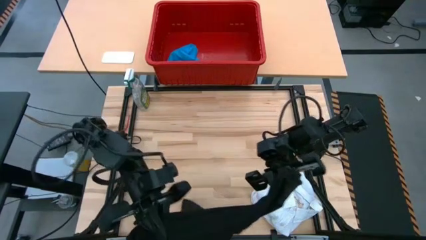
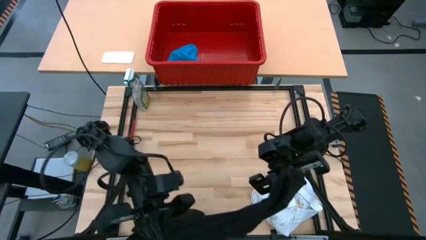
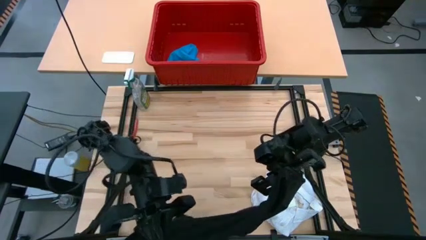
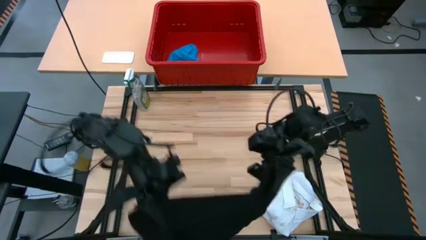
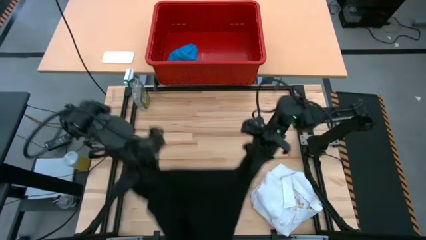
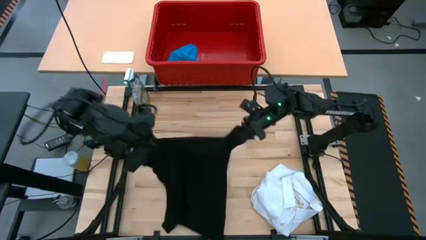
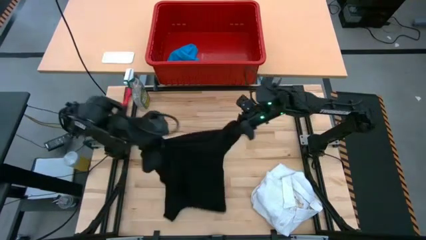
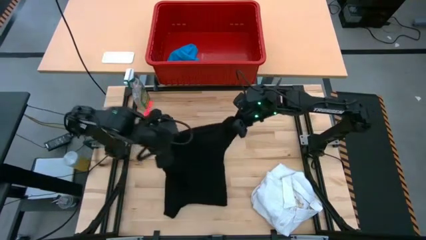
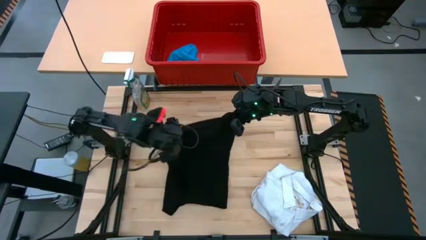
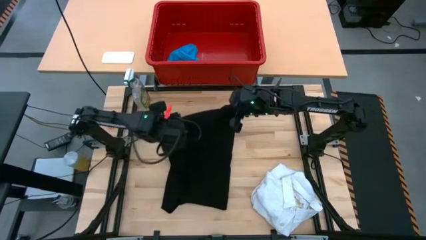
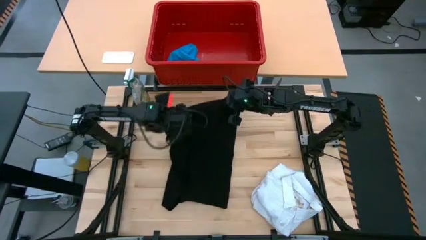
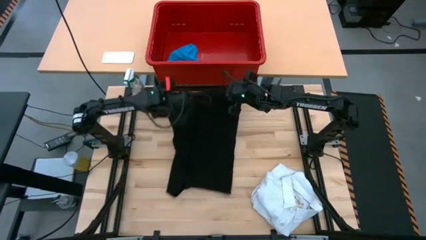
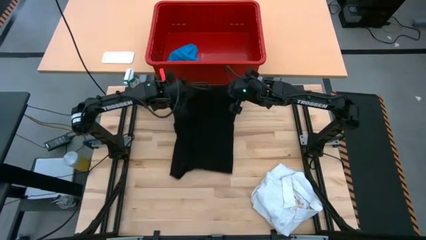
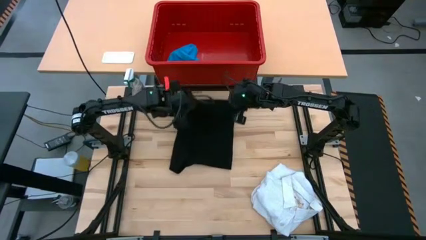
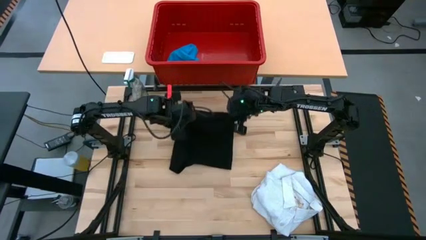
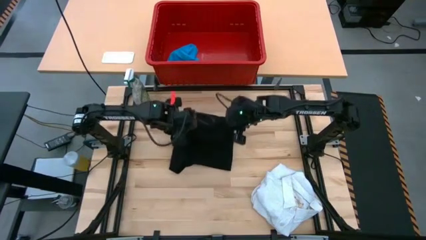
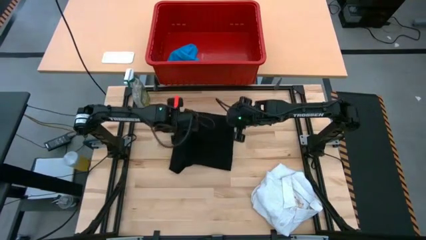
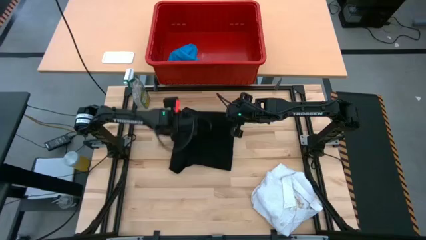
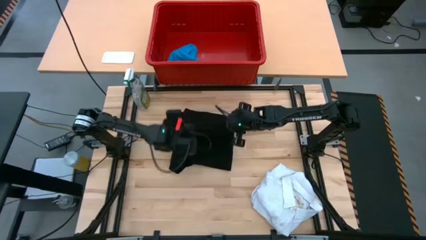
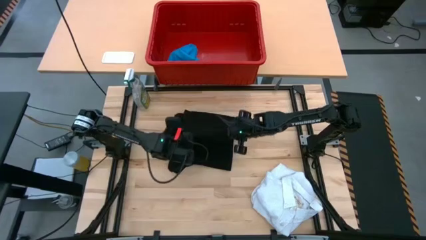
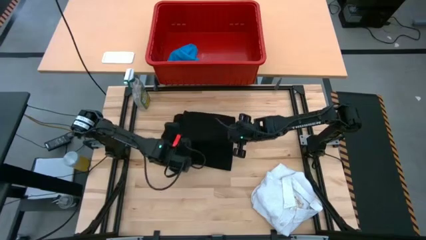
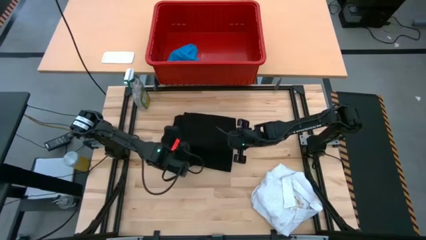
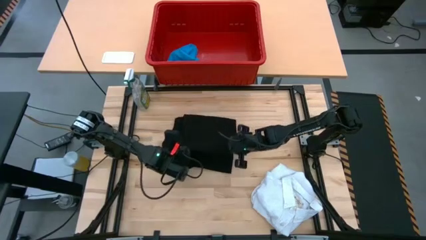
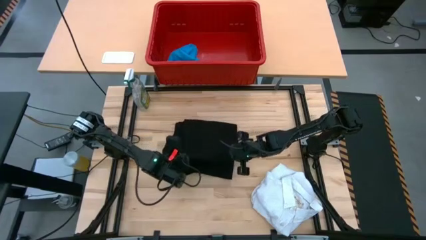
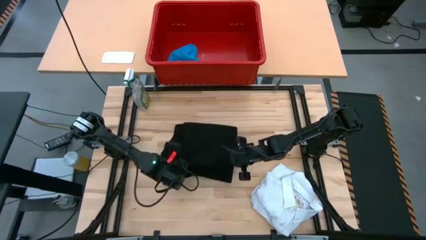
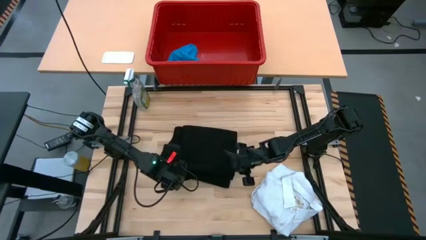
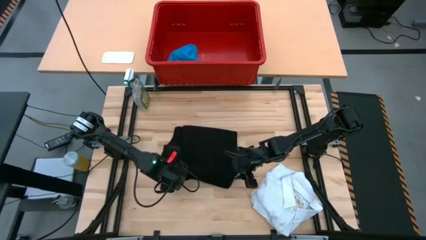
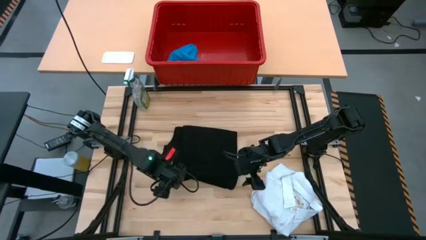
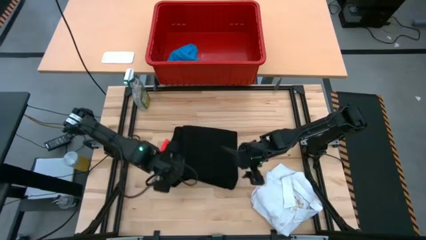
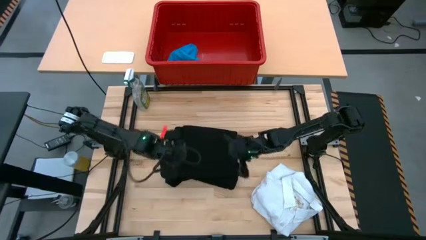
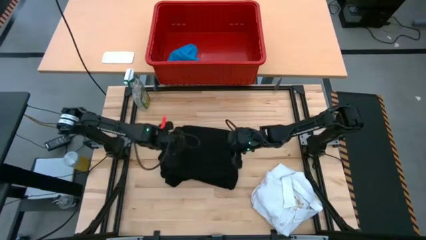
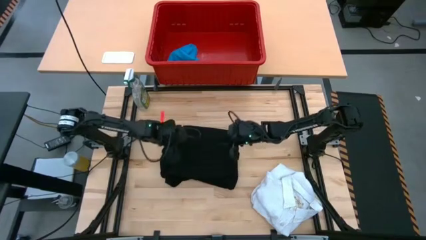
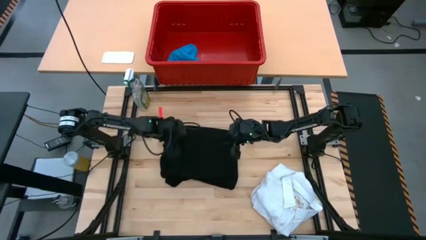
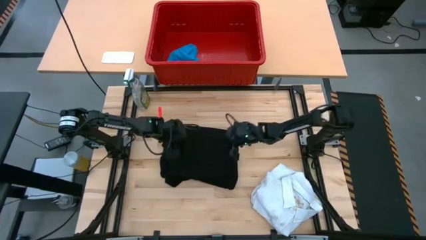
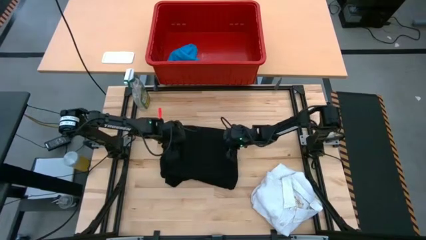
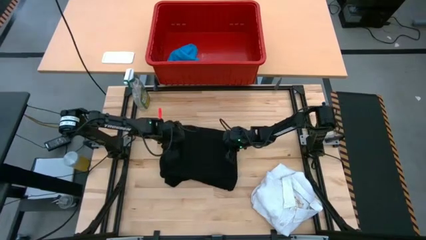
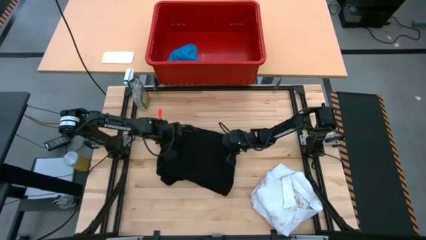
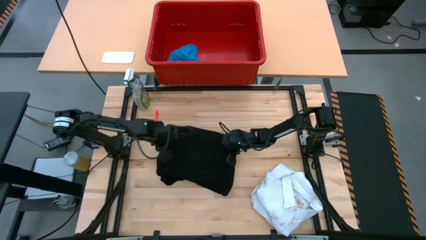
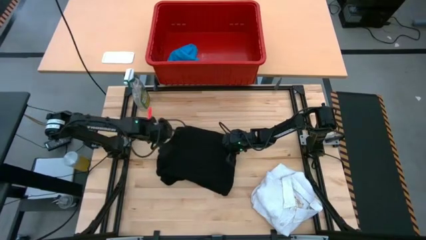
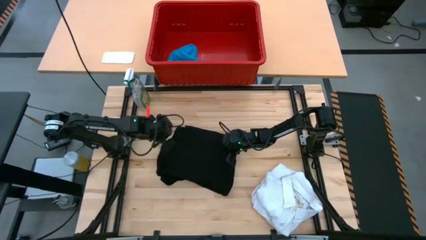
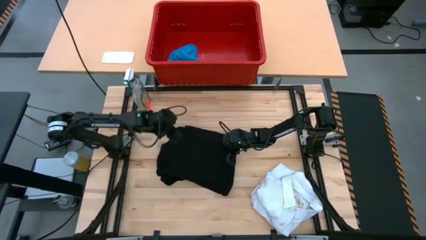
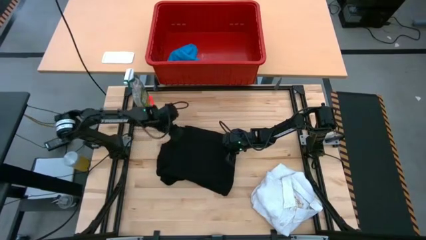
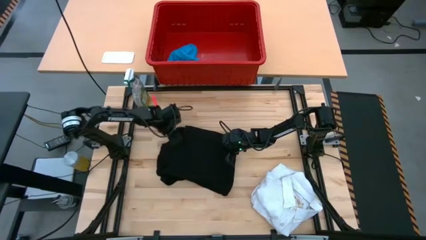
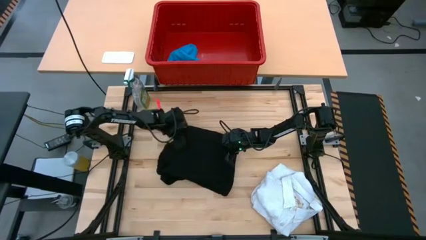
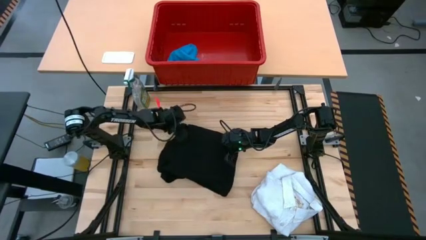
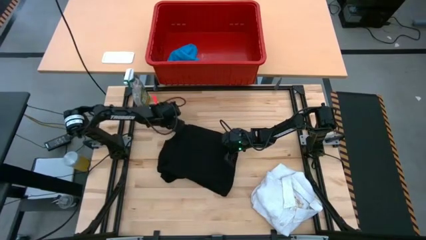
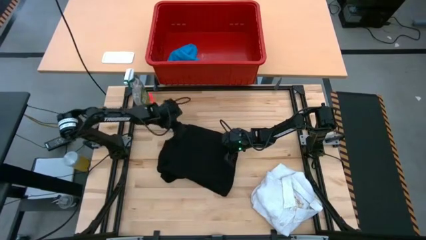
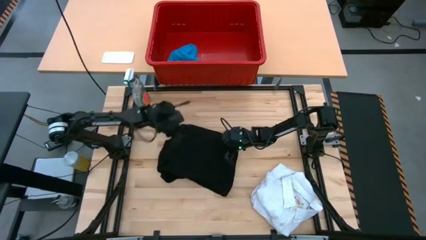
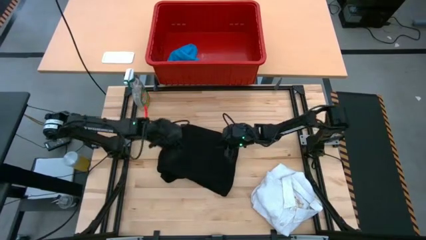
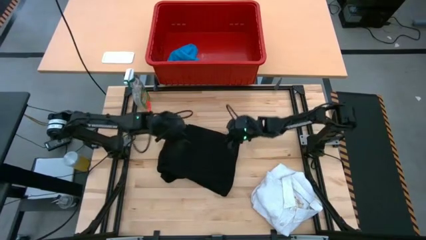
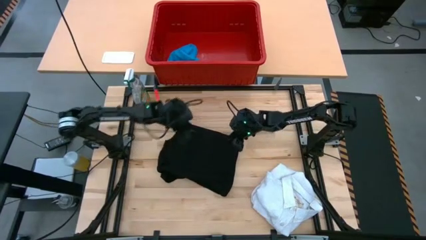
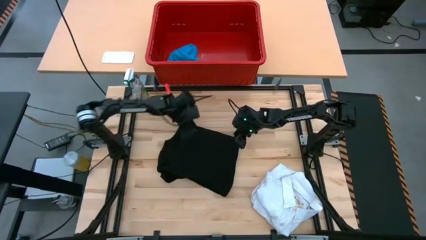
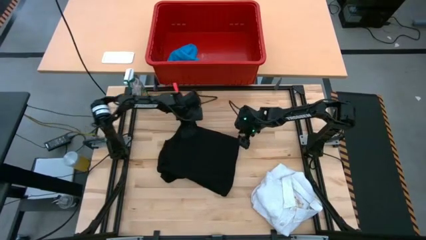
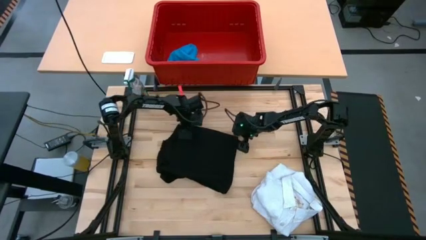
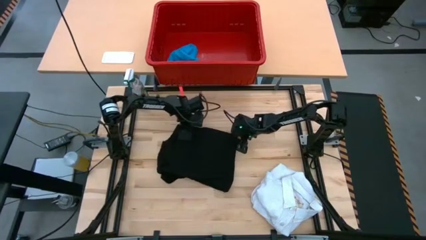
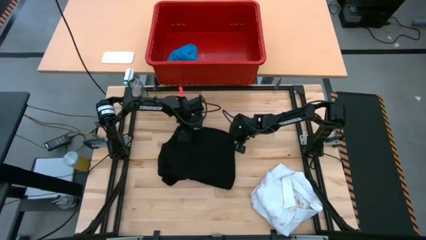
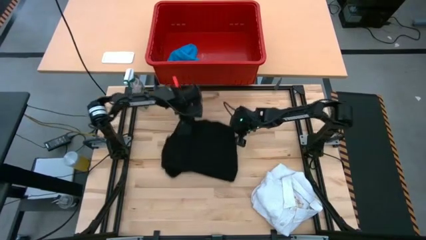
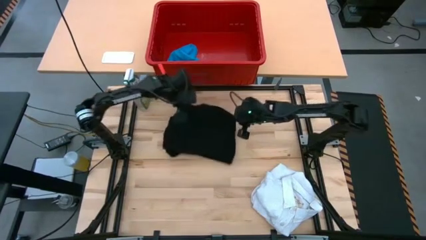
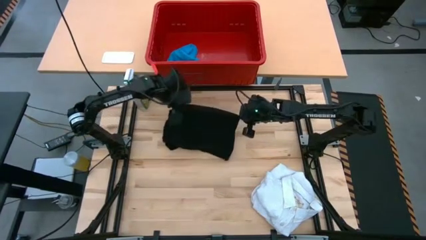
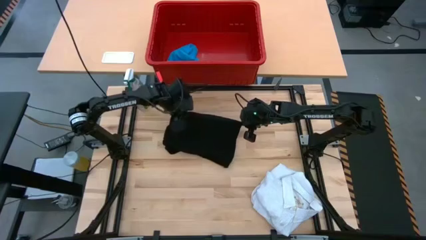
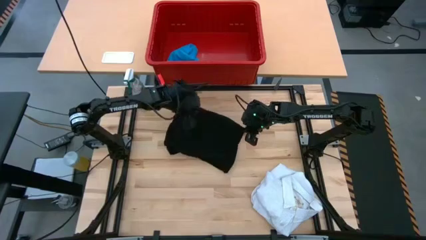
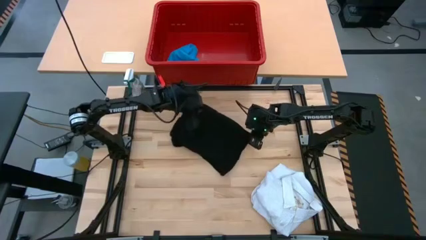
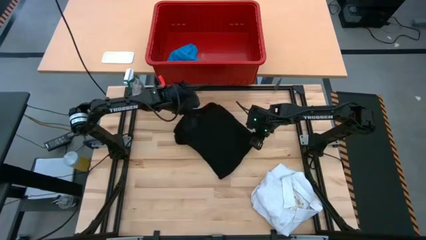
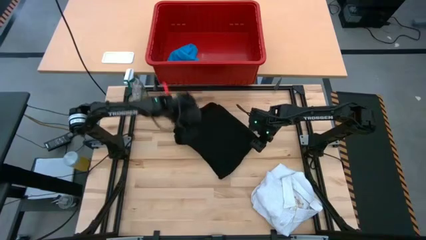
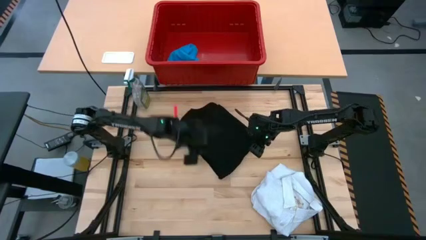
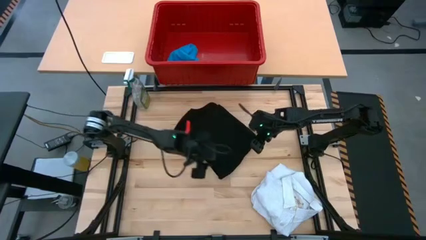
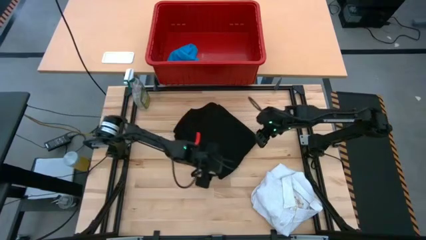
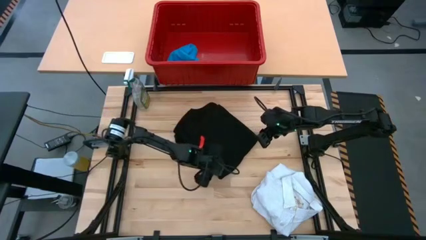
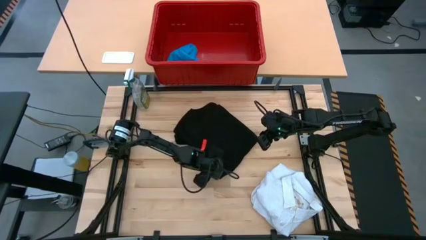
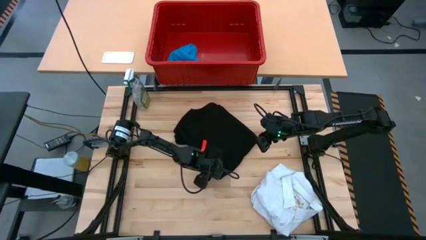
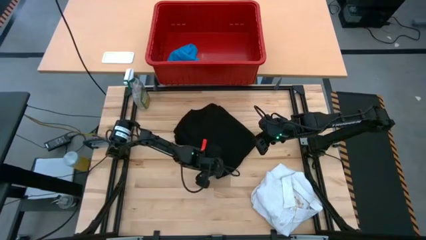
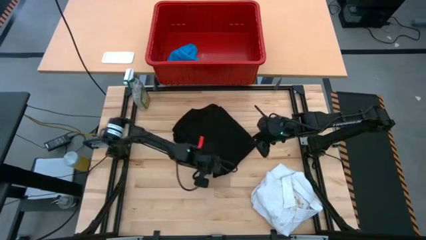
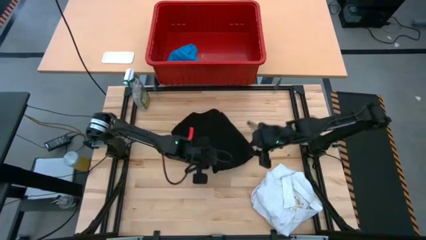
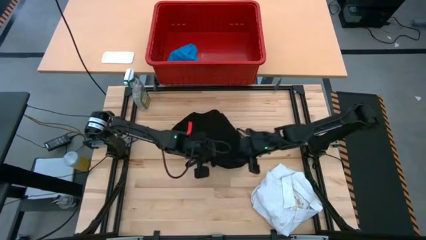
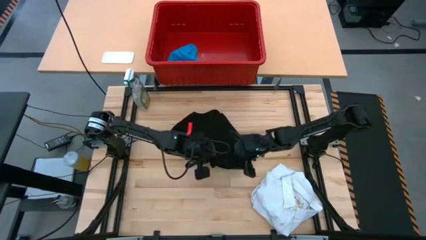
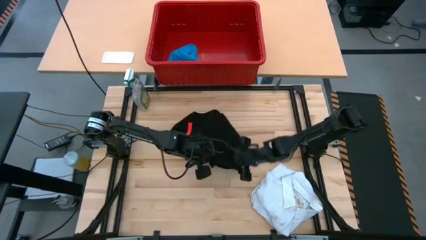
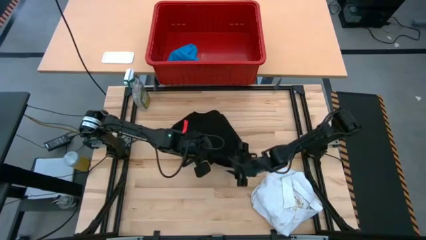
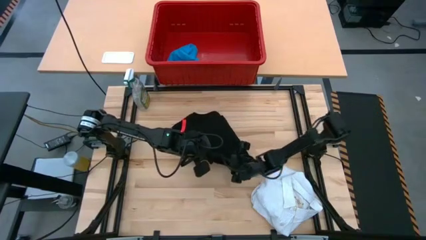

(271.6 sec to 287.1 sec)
Task: Fold laundry
Fold the black shirt

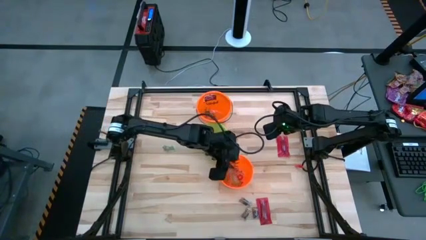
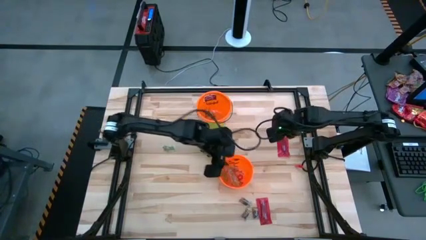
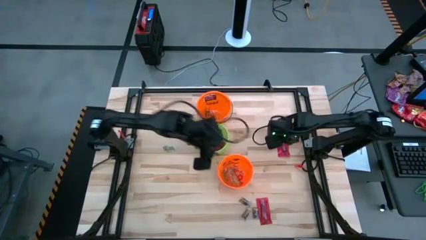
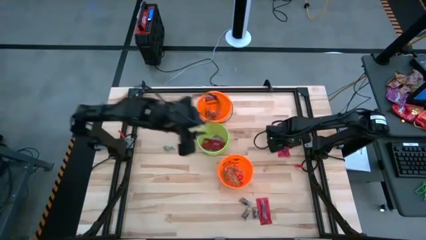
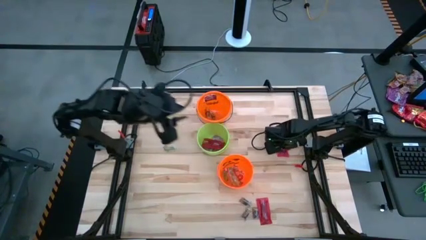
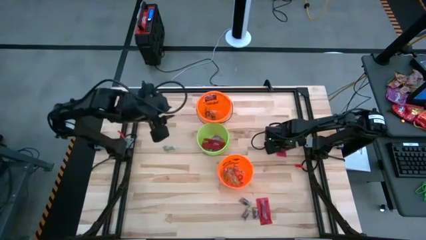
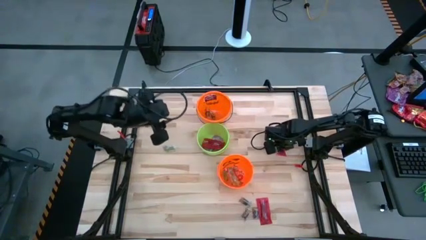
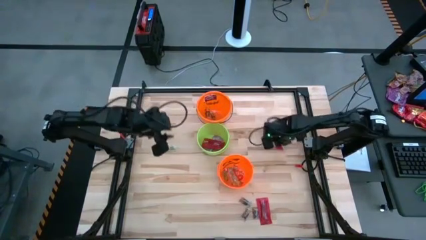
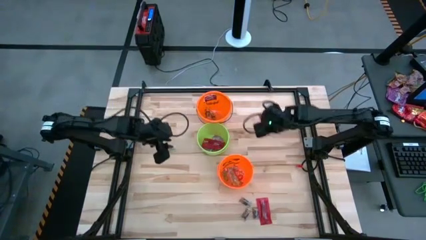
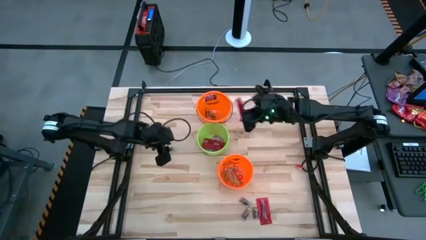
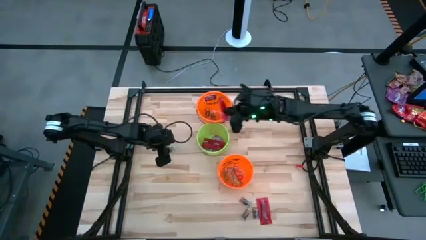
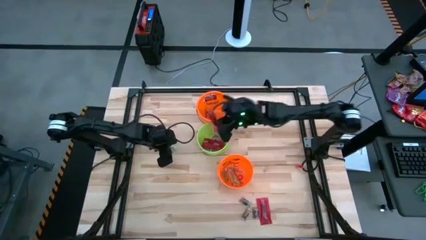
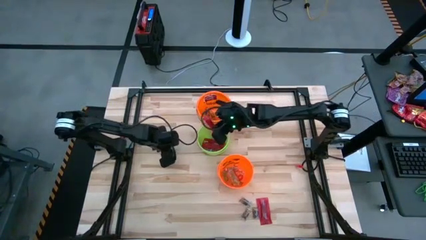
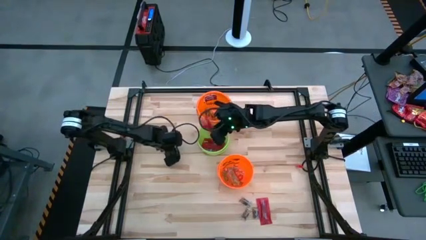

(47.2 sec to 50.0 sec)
Task: Sort candy by brand, put in halloween buckets
Put the red candy into the green bucket
